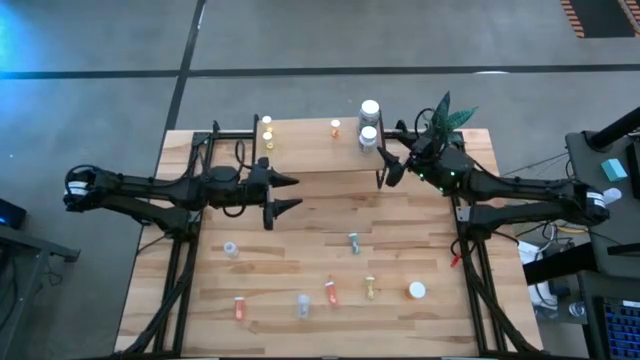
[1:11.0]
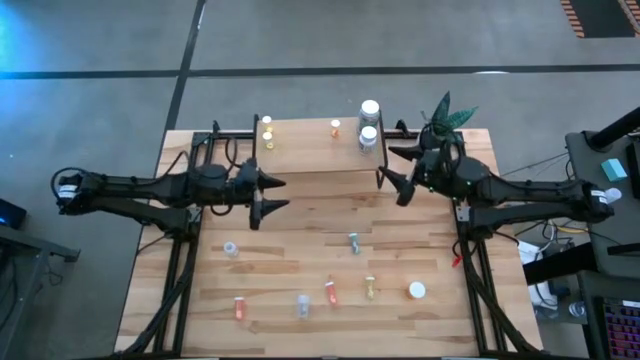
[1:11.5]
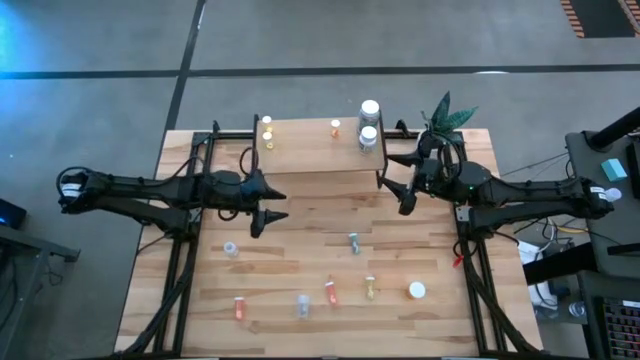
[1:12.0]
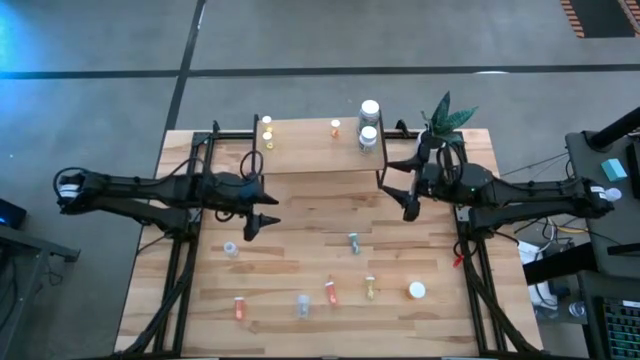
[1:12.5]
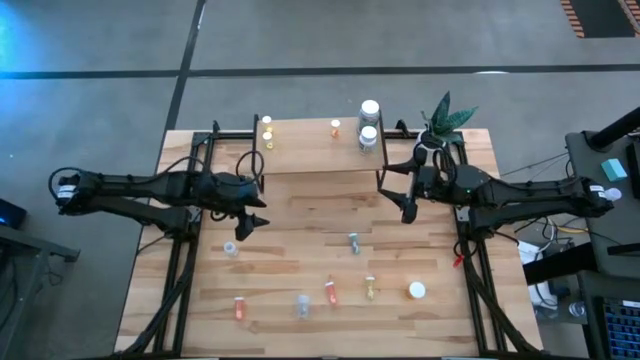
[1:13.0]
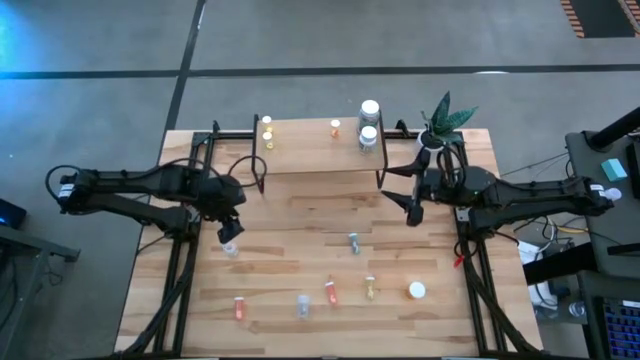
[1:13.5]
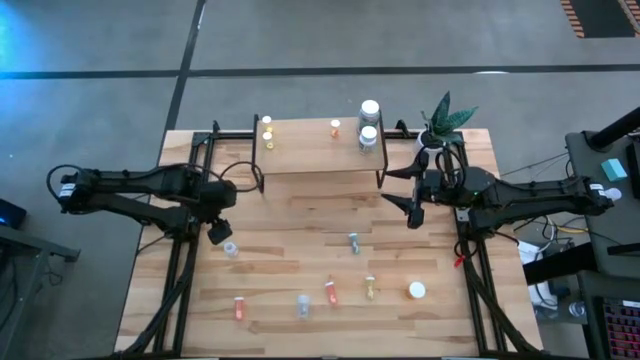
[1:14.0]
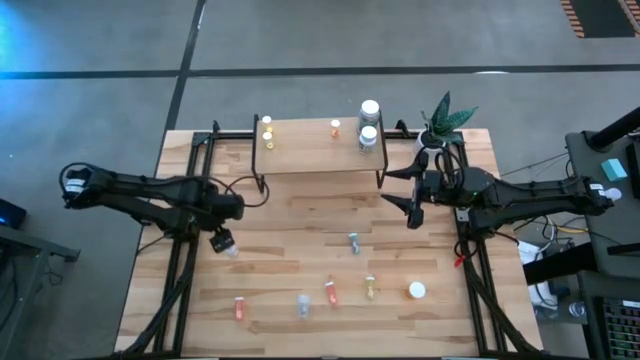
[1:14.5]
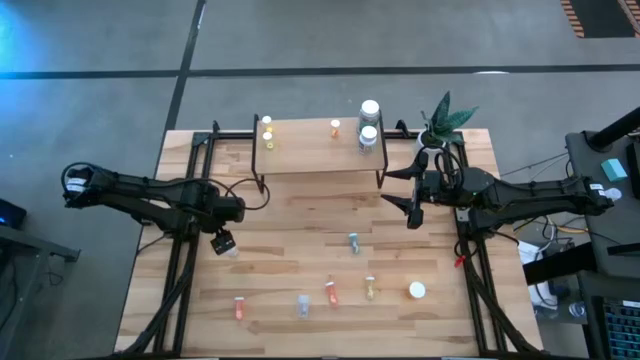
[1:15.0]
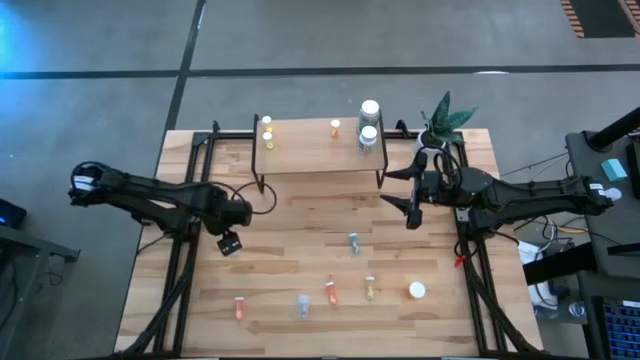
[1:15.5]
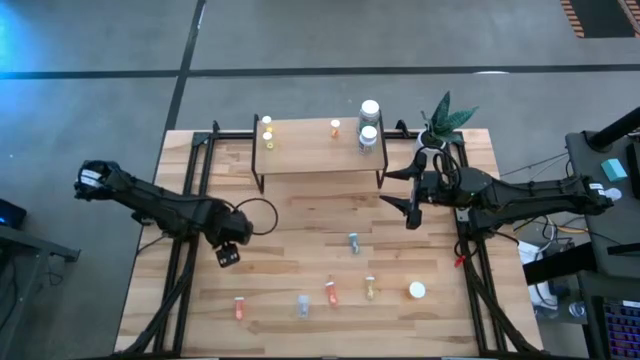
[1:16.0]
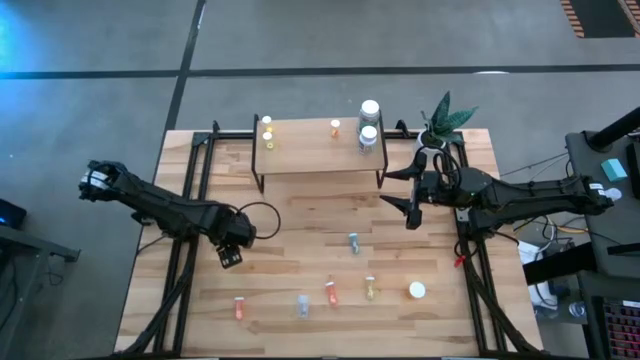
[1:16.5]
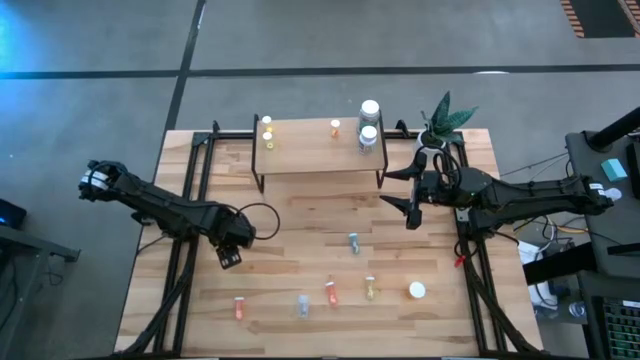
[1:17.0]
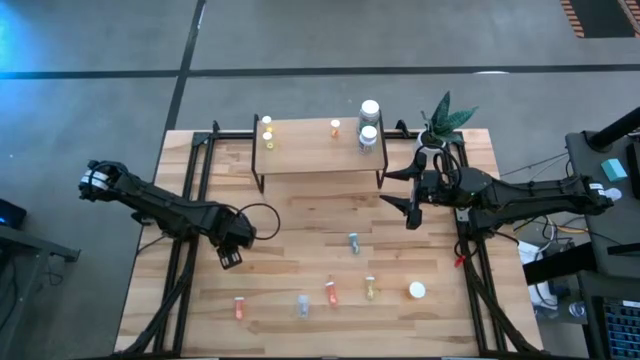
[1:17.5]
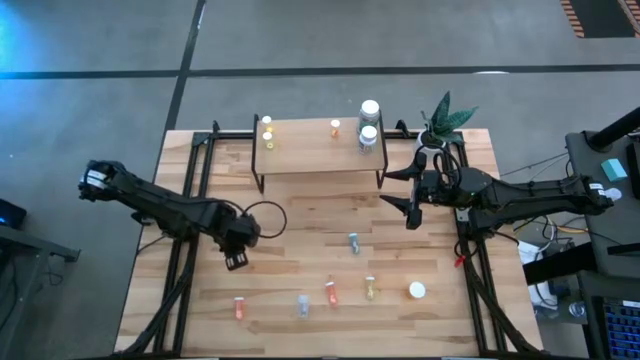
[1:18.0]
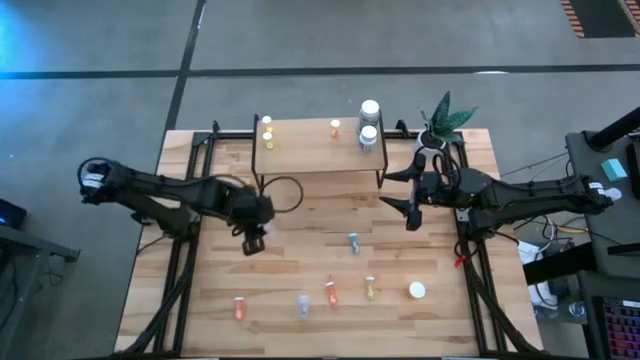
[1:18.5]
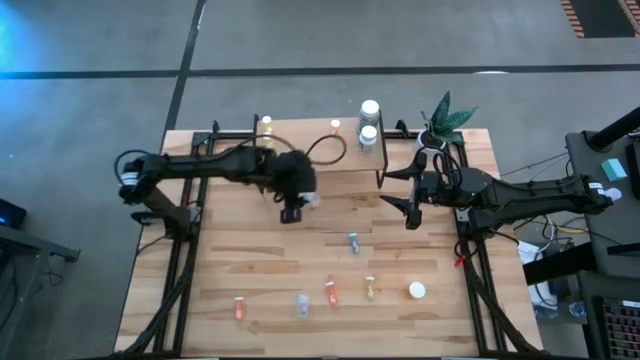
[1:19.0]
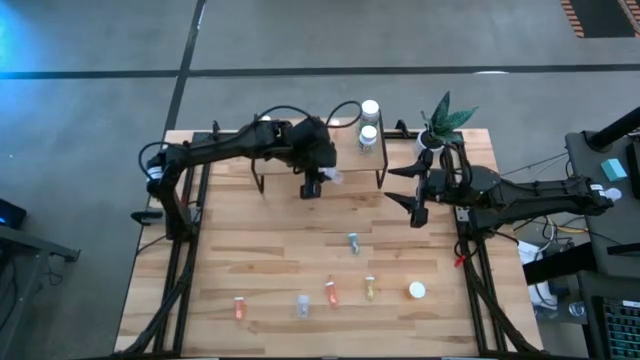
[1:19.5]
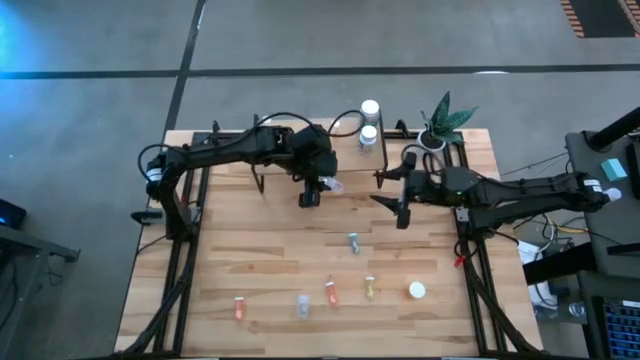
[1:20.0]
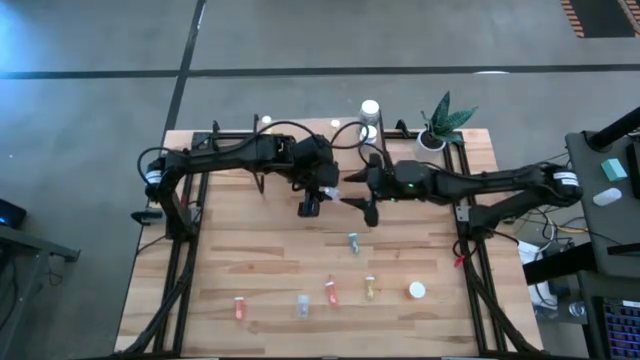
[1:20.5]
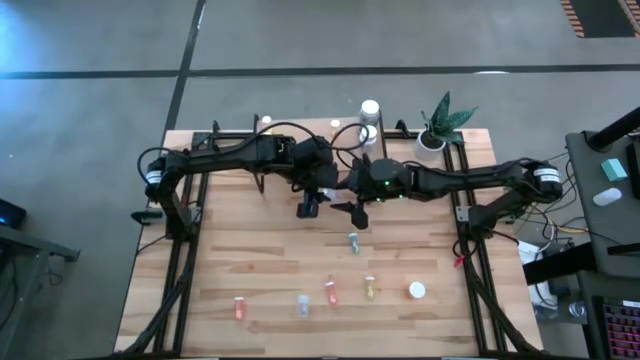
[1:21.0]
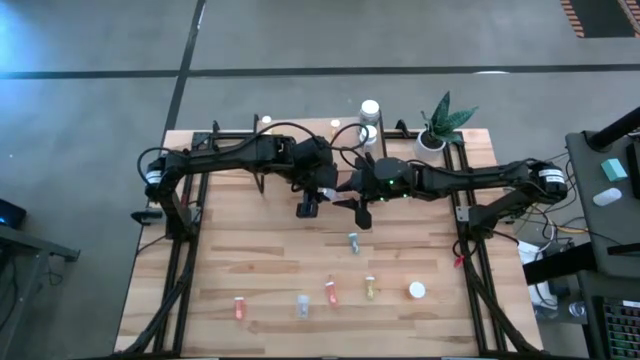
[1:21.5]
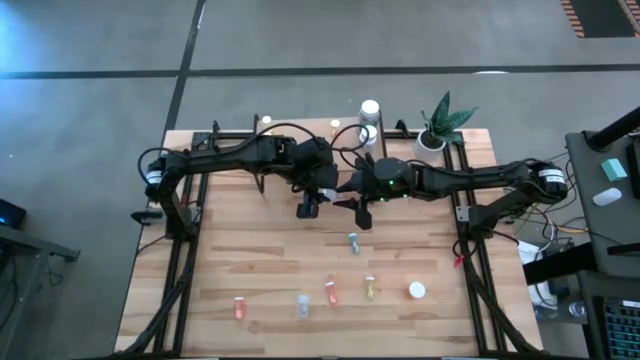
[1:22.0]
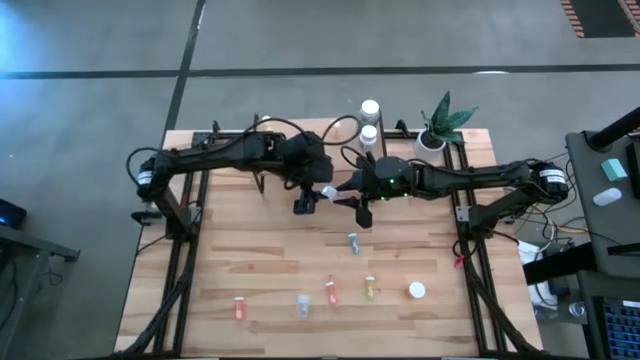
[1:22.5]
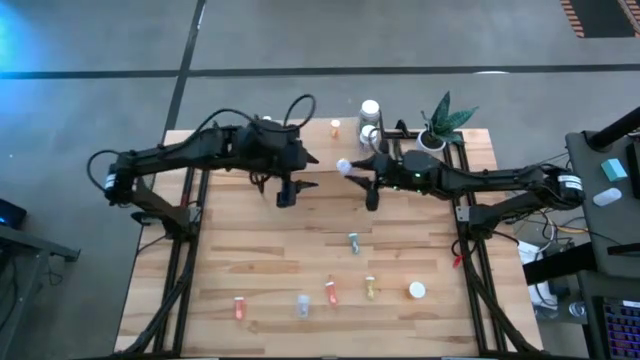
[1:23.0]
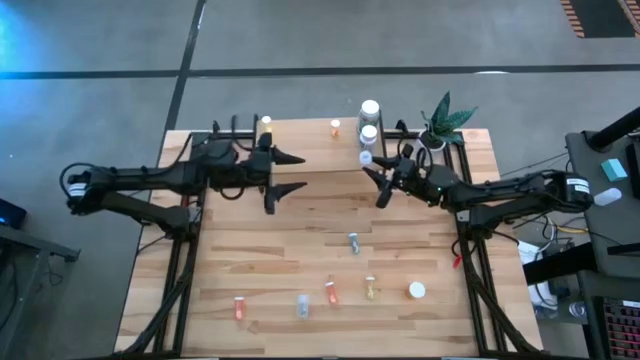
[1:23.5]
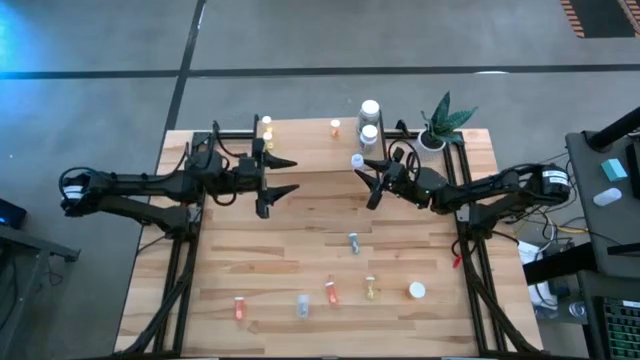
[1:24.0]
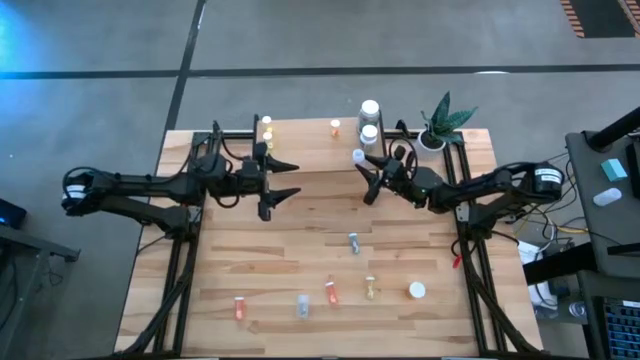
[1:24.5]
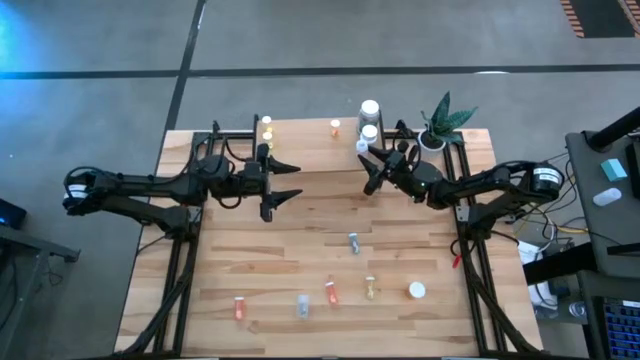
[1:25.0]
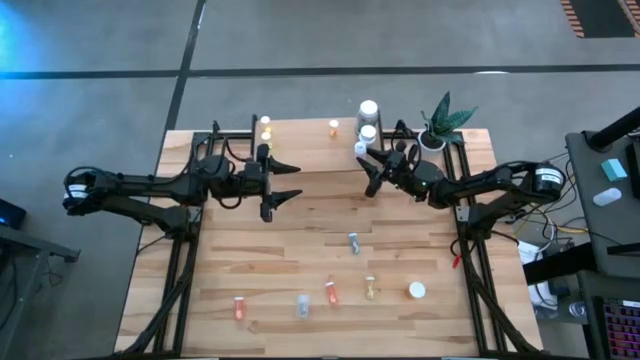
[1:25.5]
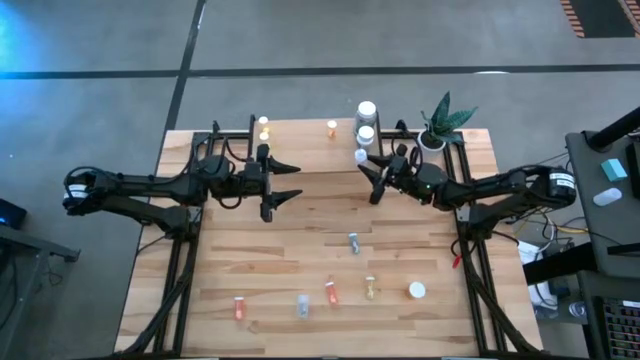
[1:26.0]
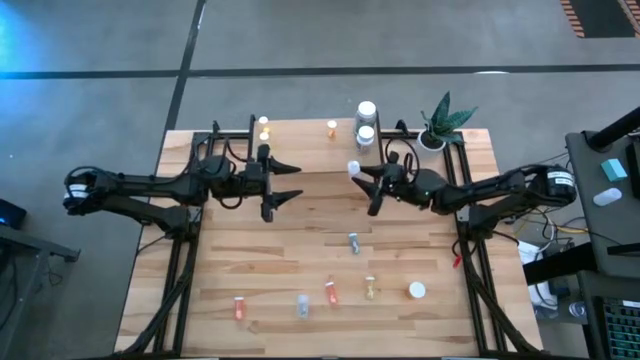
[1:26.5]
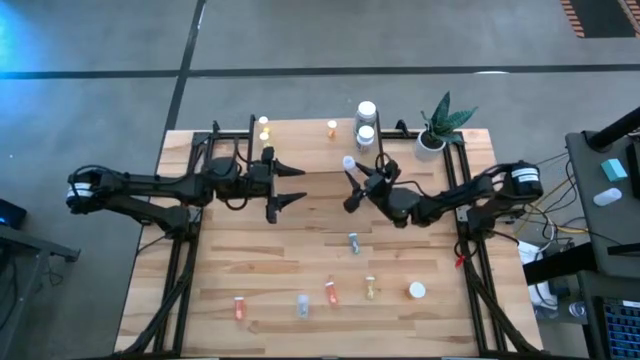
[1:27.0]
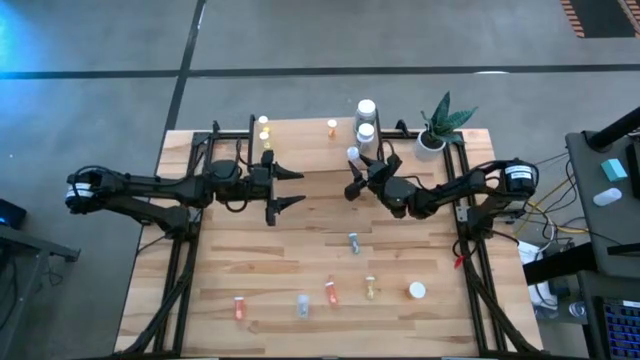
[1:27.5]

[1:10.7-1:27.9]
Task: Pick and place medicine bottles onto shelf by color
Put the transparent pill bottle on the shelf

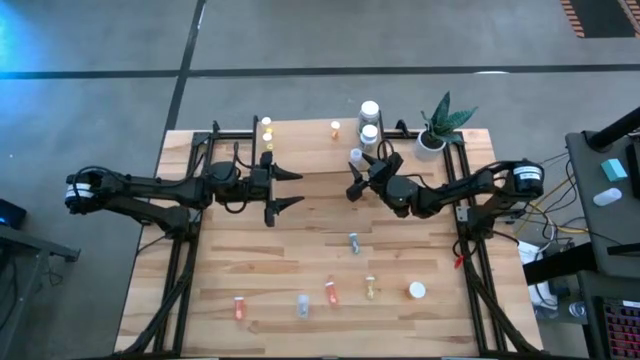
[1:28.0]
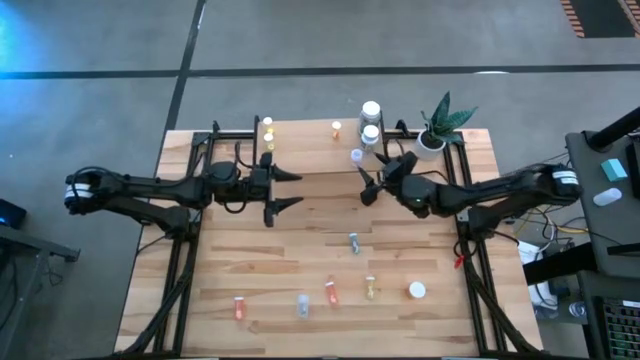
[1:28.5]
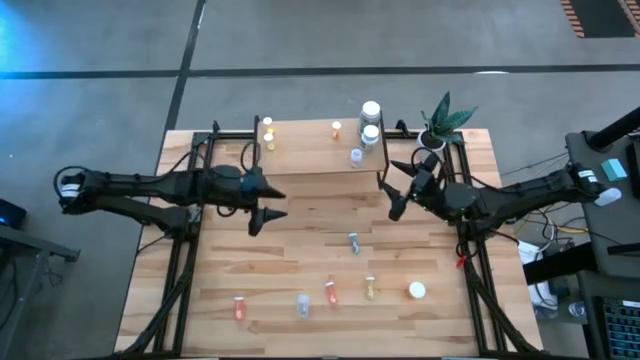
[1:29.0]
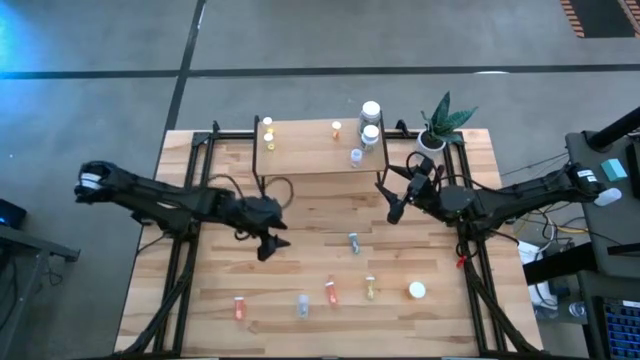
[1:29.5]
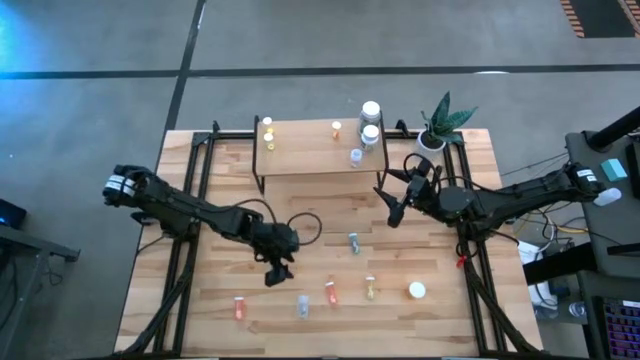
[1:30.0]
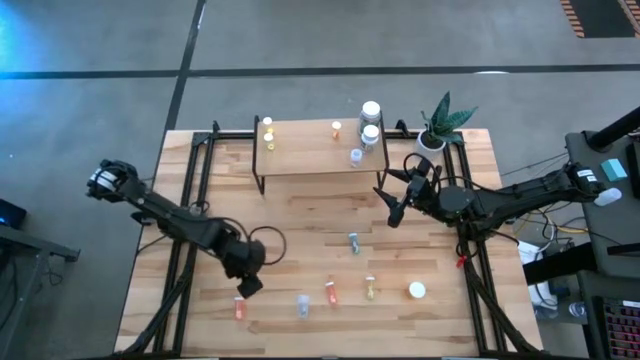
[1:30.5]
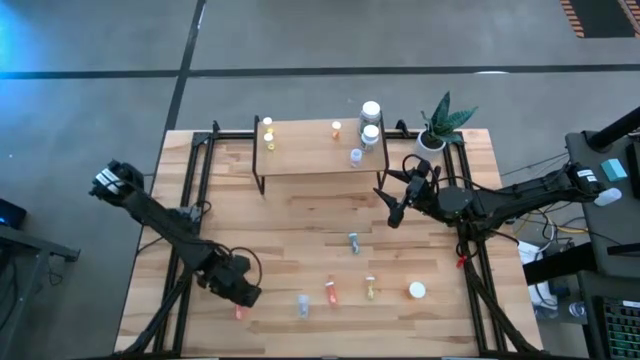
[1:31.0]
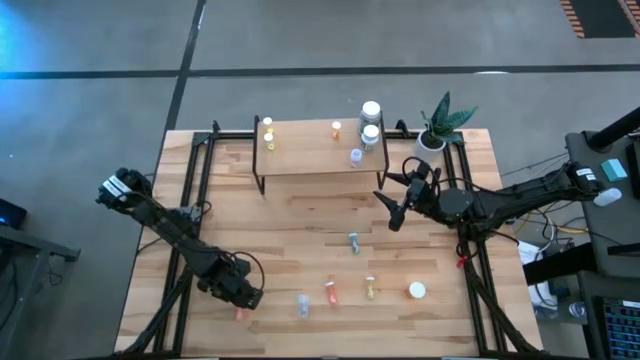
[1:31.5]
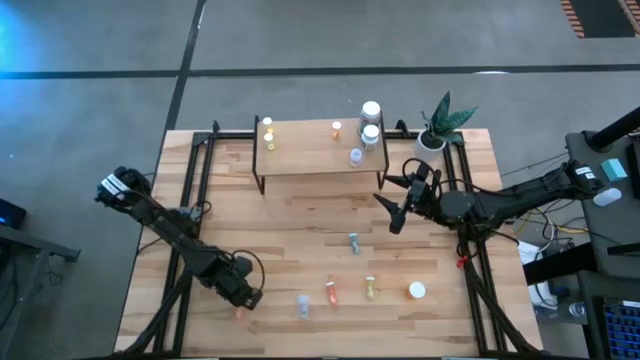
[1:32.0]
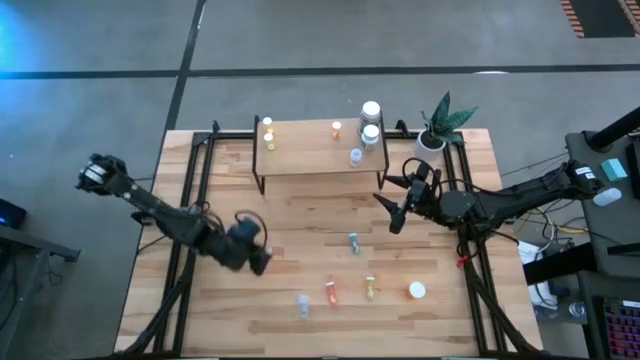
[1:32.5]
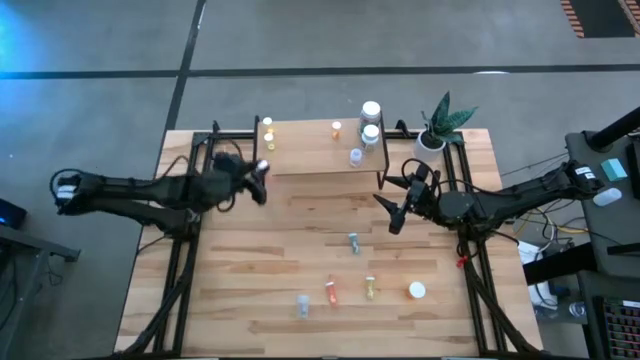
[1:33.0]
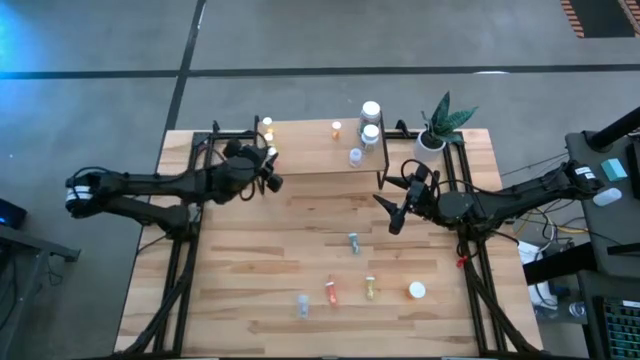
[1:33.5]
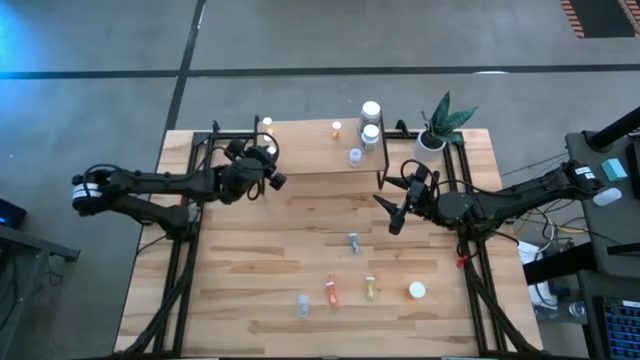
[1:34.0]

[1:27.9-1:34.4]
Put the pink pill bottle on the shelf
